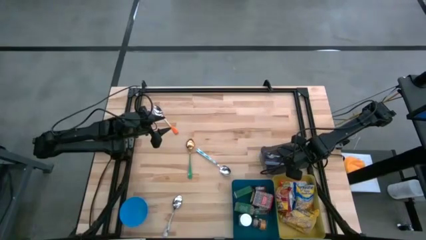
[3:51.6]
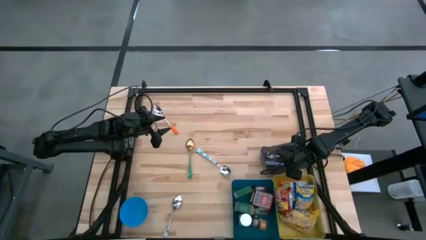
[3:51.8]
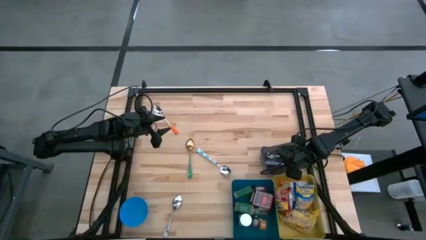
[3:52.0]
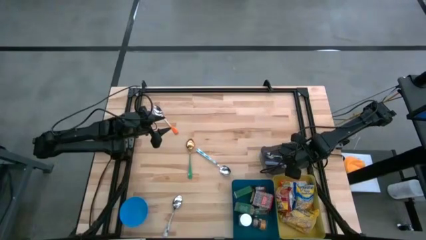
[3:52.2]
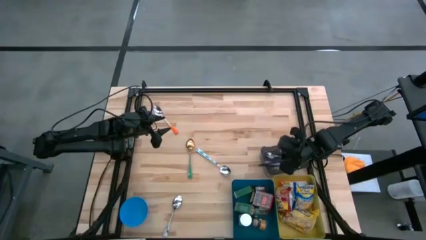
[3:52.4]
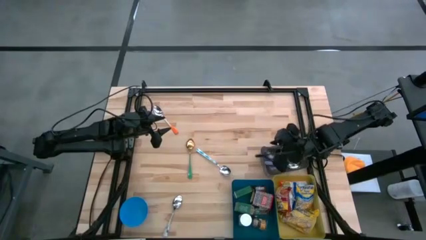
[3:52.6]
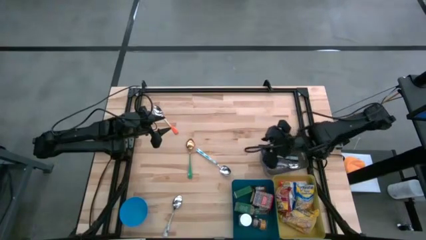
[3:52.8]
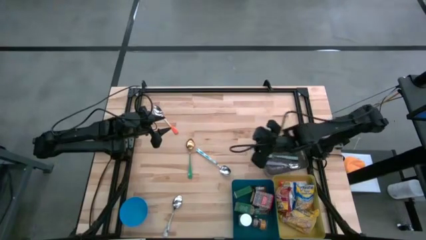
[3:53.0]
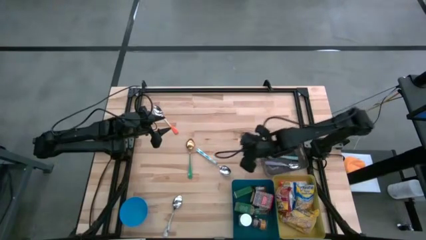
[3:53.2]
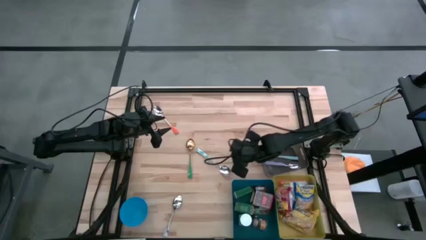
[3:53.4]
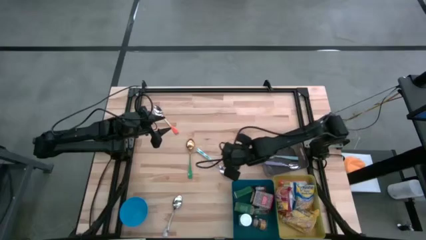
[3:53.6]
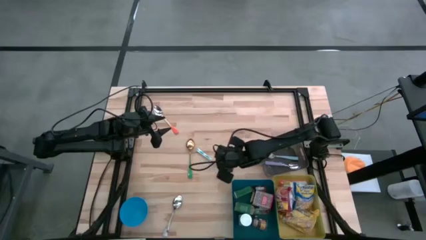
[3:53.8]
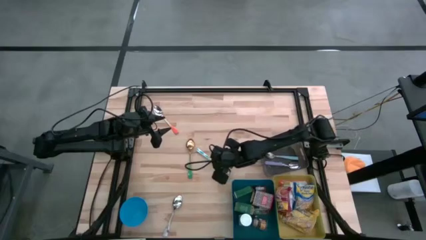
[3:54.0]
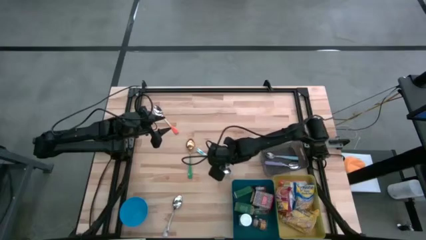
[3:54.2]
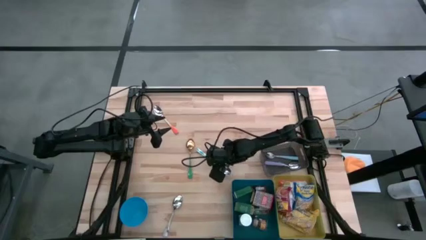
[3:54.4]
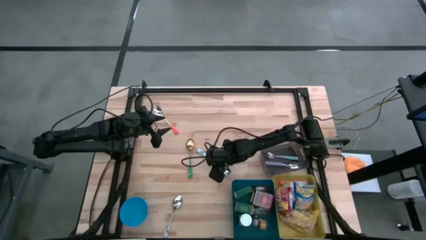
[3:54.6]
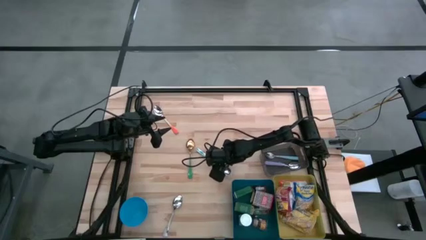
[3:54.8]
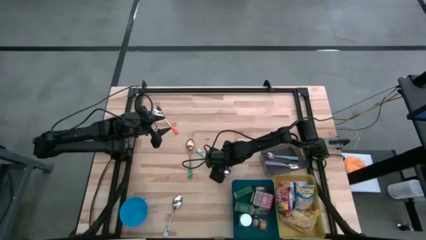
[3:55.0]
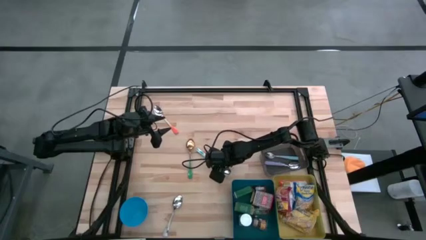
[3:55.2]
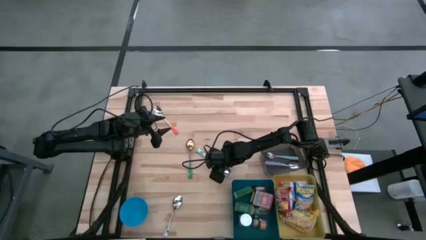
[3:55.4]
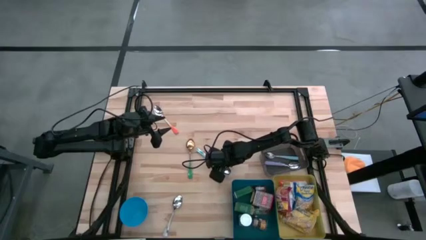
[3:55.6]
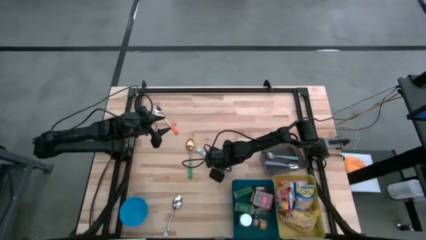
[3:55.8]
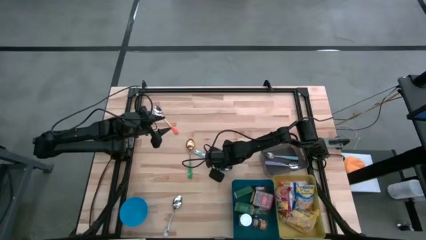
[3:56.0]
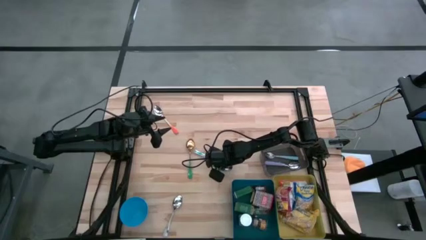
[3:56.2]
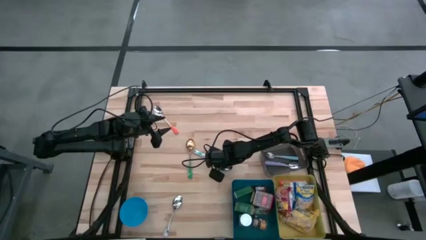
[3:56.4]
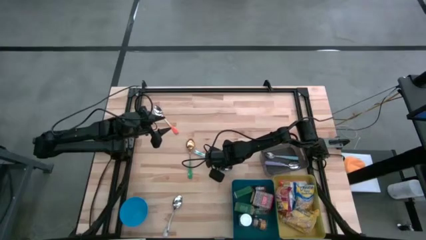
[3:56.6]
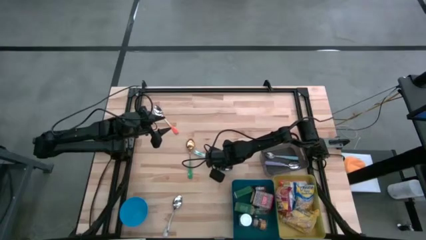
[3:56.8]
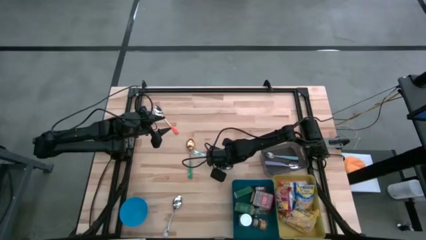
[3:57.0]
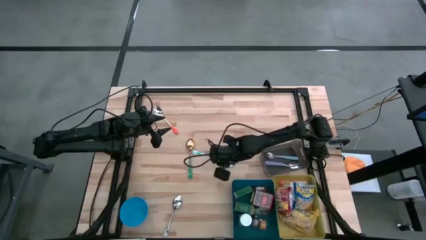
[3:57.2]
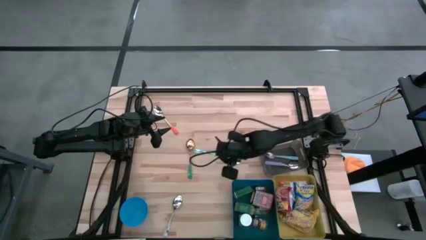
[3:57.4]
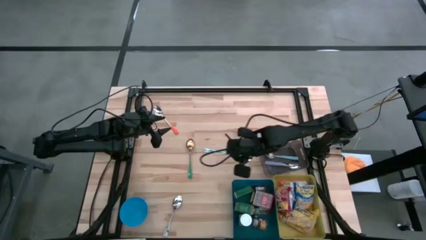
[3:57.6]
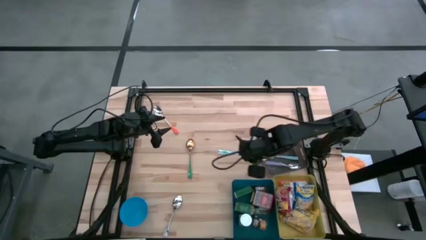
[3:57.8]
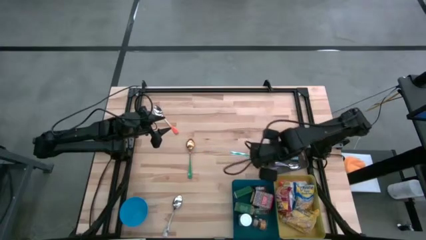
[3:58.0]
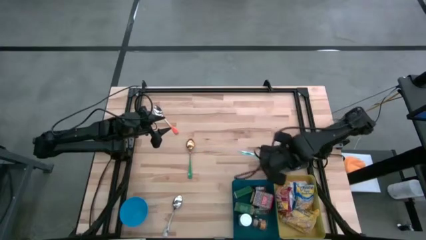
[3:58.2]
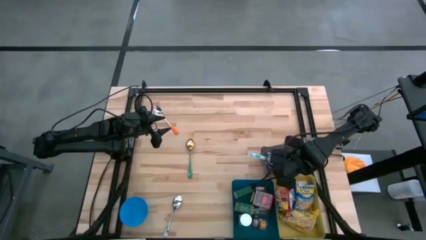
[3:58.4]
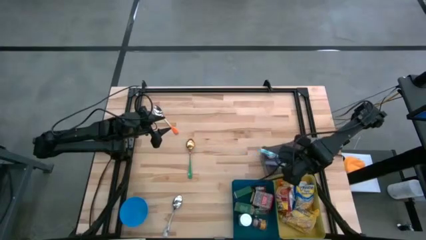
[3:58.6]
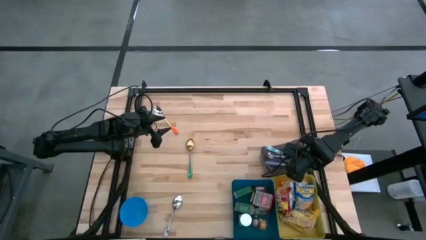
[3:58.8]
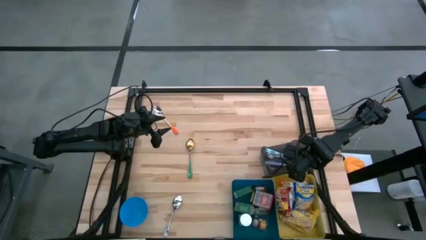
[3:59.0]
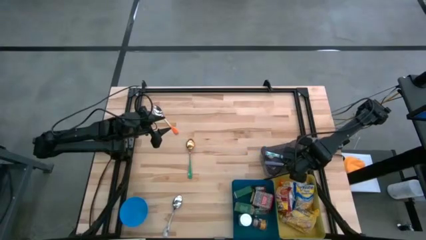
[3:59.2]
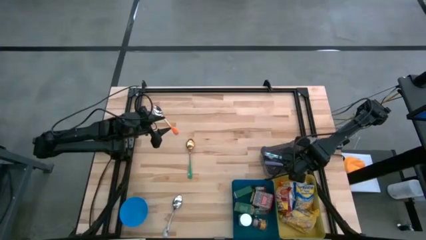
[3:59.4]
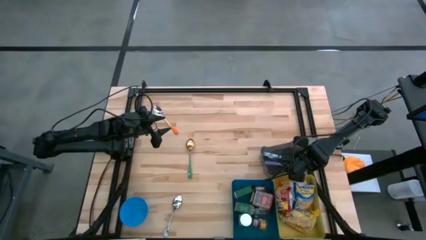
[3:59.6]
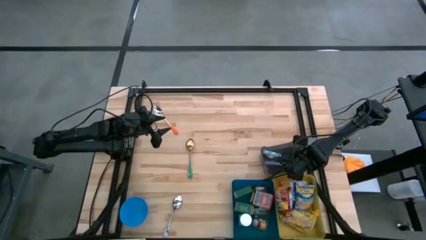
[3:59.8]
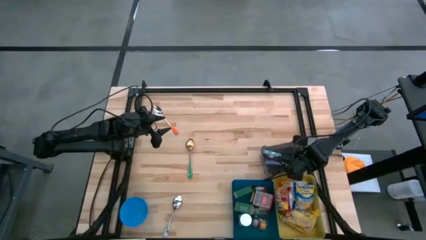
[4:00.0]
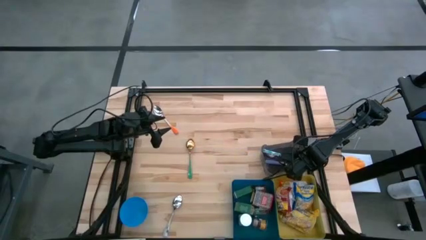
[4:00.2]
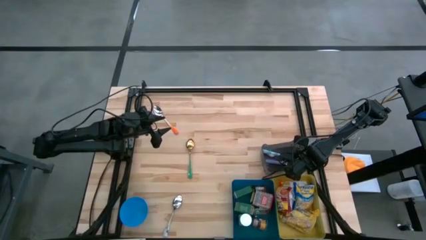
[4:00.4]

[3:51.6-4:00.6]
Put the blue patterned spoon into the black bin
